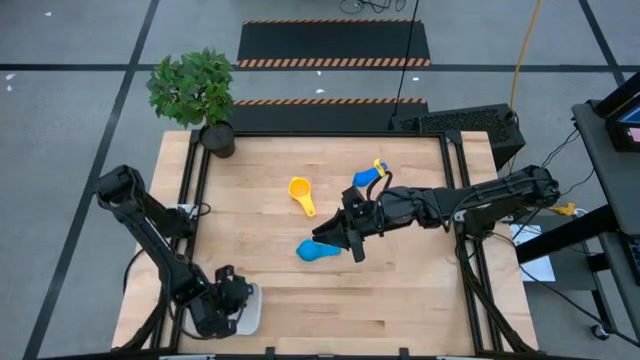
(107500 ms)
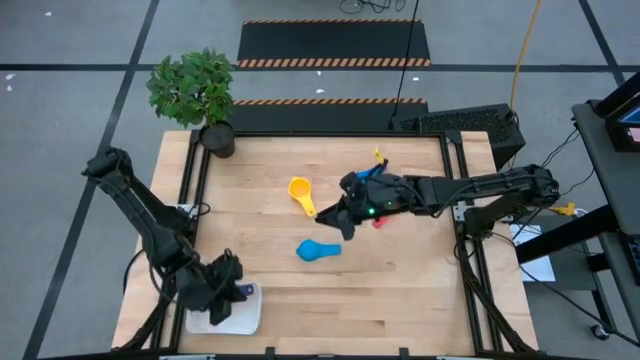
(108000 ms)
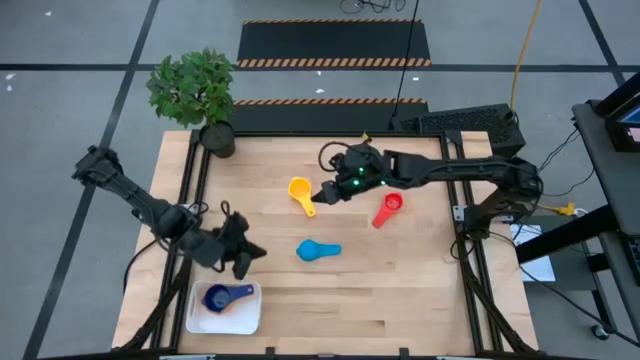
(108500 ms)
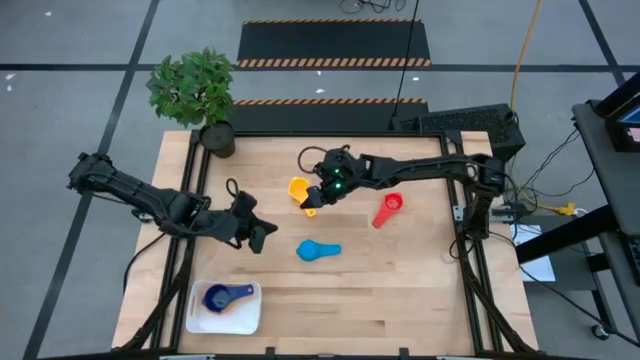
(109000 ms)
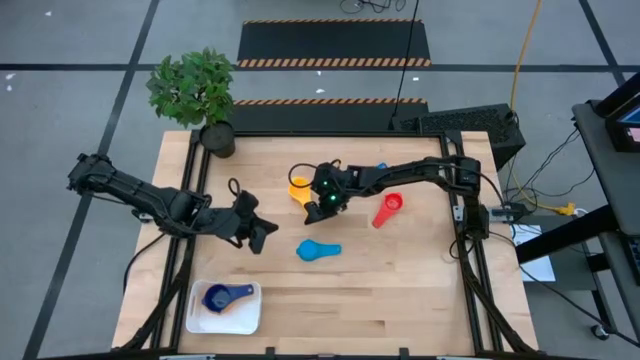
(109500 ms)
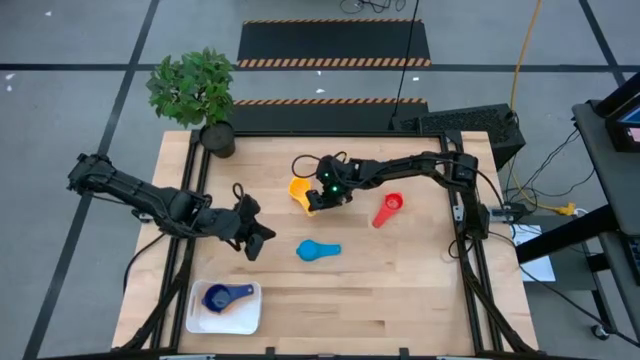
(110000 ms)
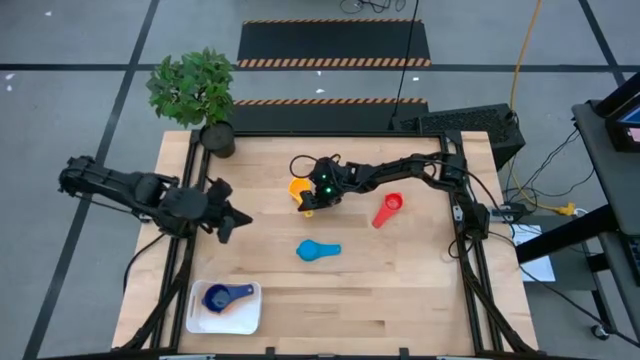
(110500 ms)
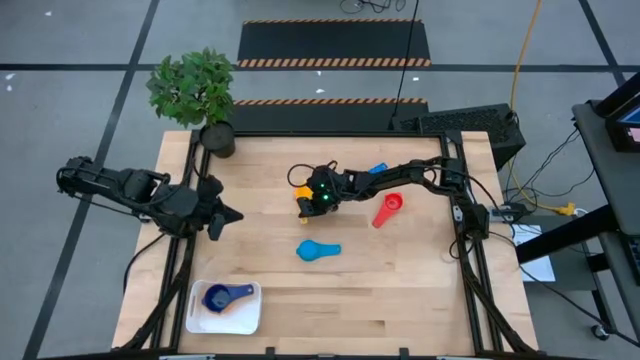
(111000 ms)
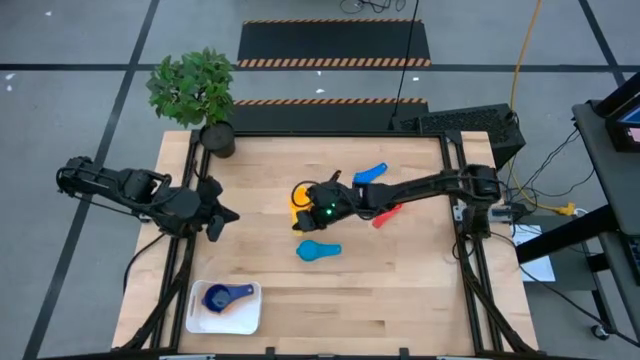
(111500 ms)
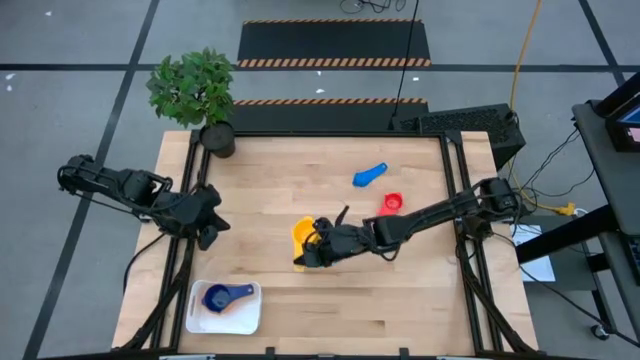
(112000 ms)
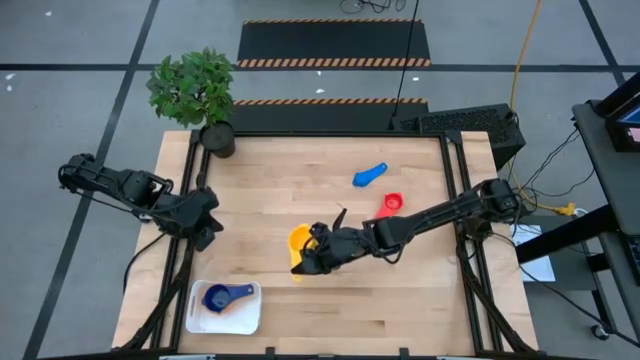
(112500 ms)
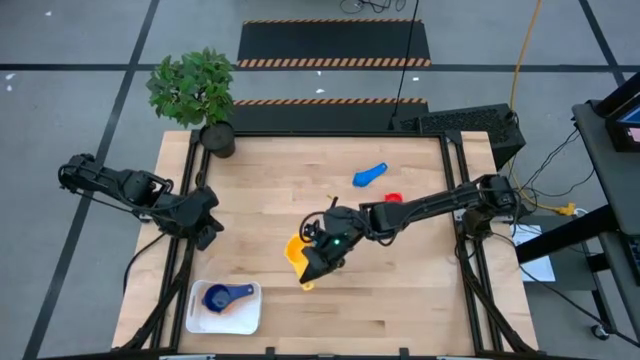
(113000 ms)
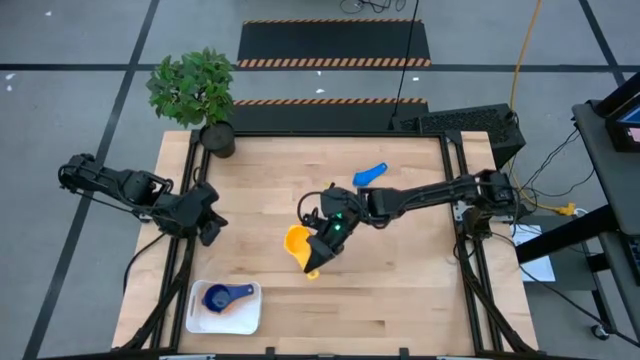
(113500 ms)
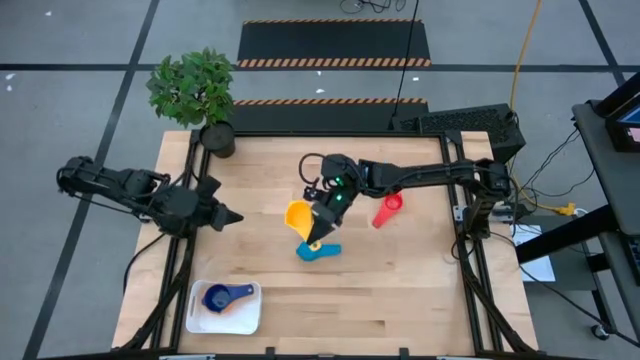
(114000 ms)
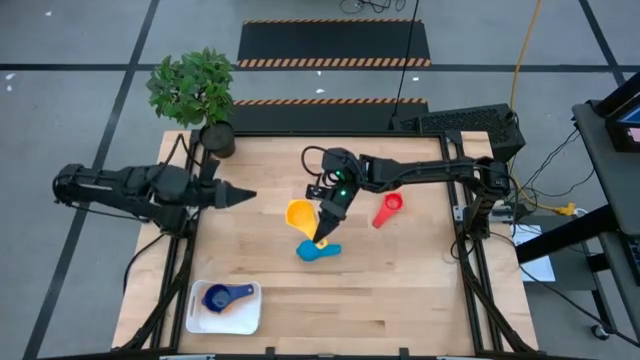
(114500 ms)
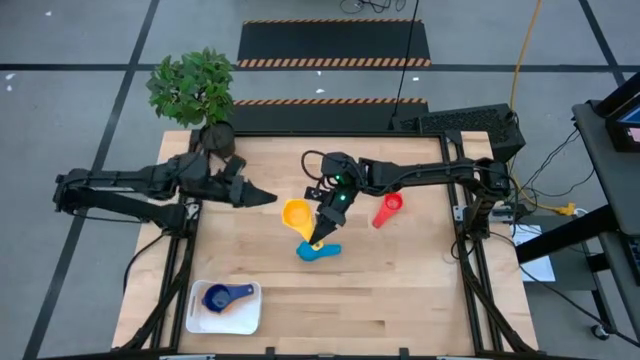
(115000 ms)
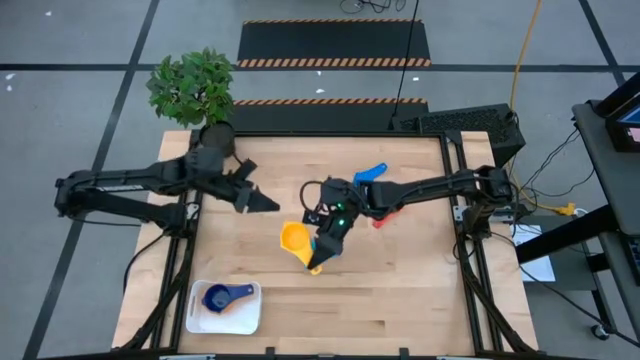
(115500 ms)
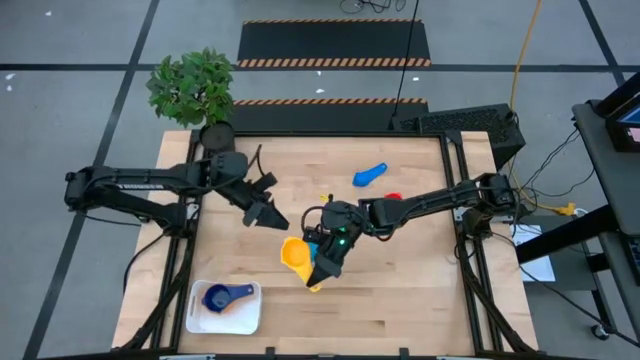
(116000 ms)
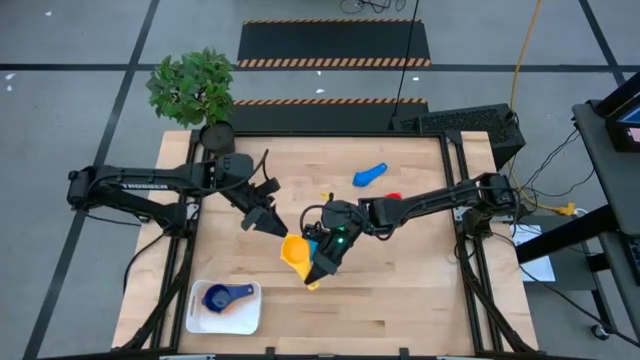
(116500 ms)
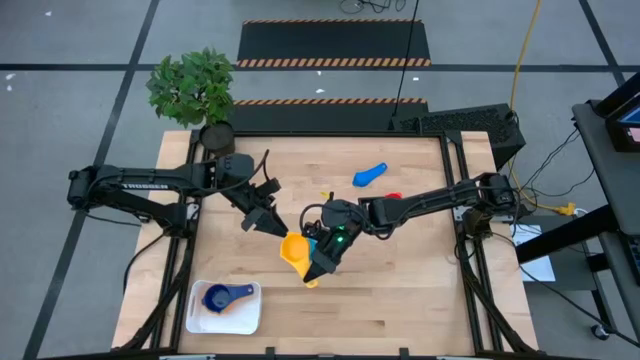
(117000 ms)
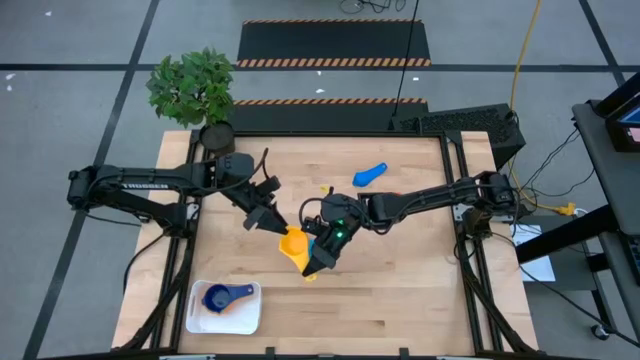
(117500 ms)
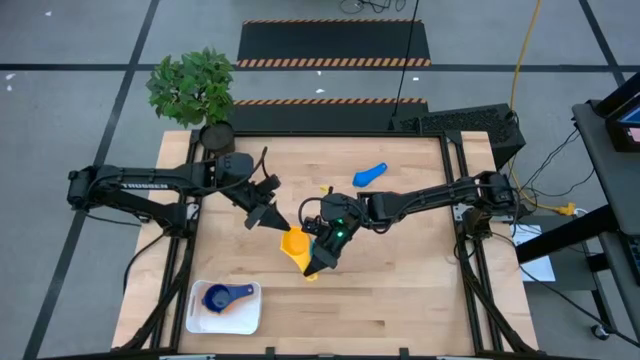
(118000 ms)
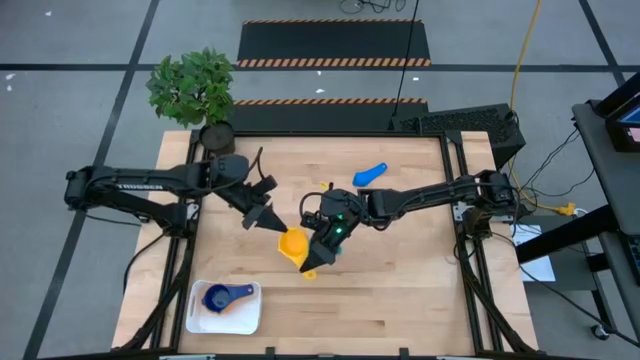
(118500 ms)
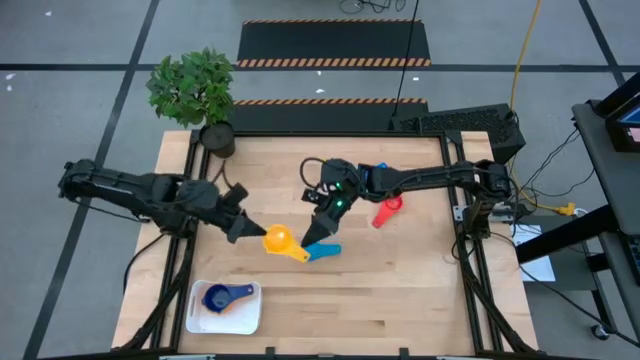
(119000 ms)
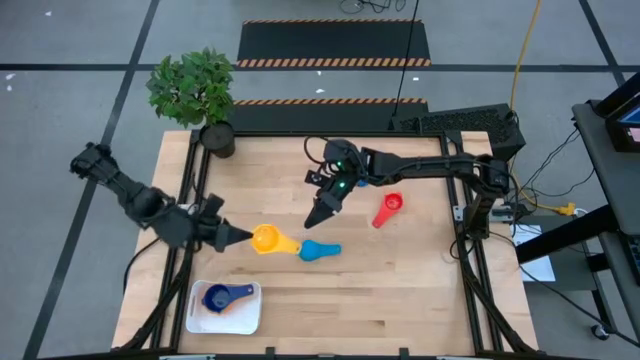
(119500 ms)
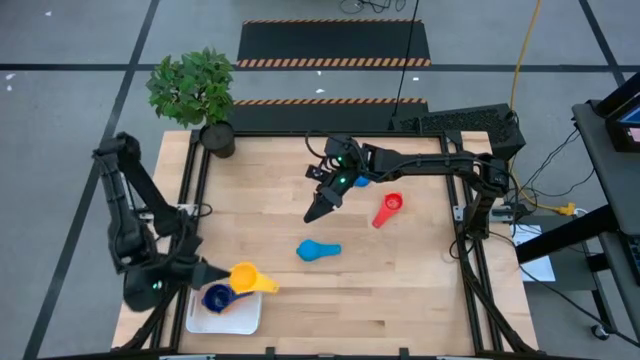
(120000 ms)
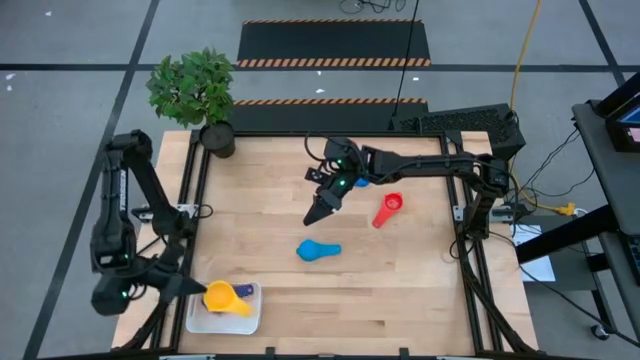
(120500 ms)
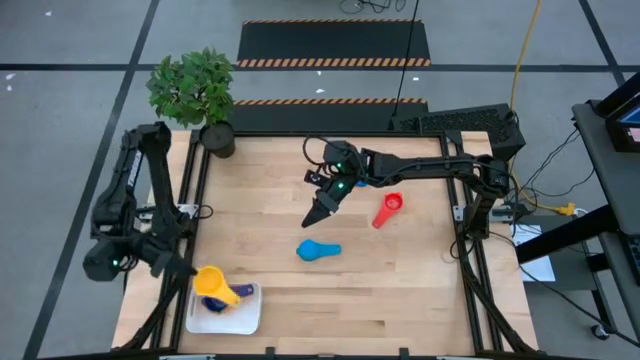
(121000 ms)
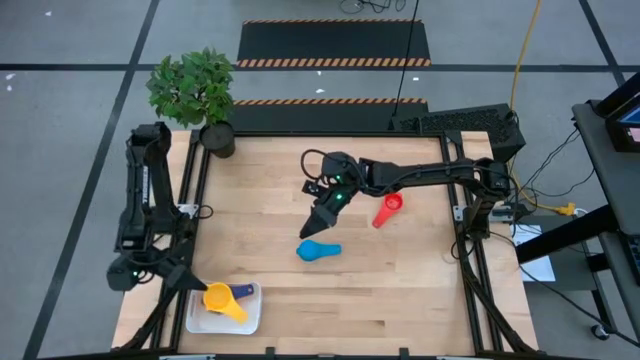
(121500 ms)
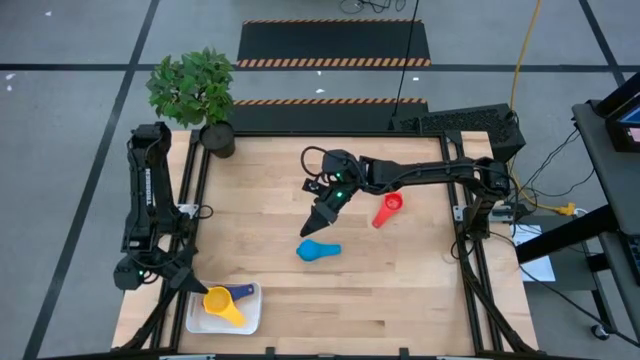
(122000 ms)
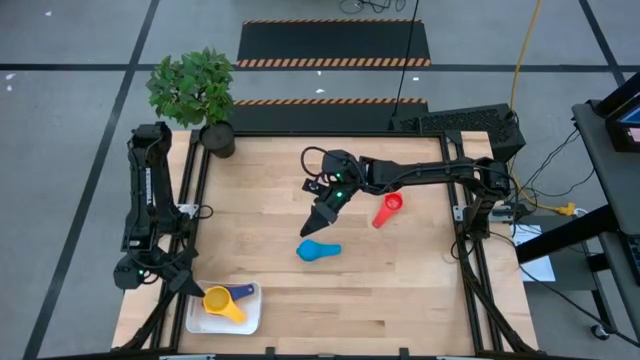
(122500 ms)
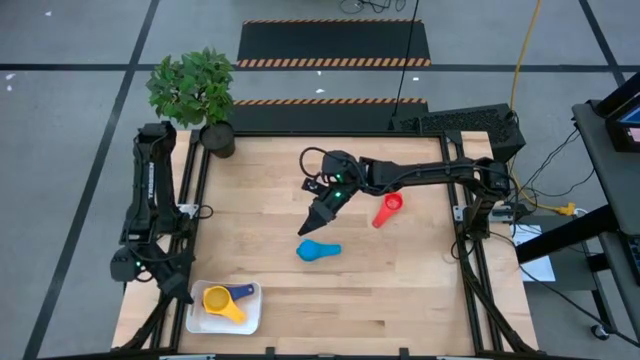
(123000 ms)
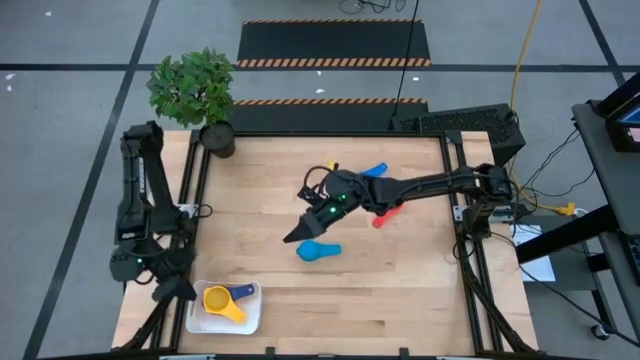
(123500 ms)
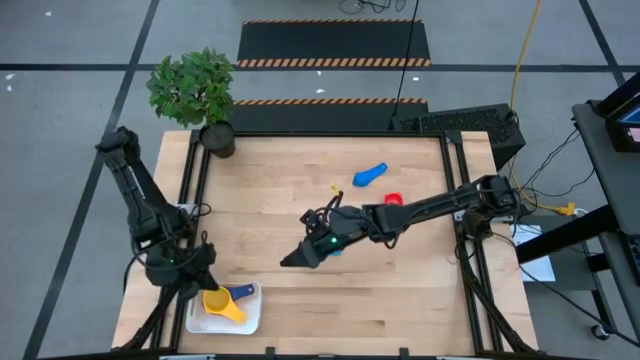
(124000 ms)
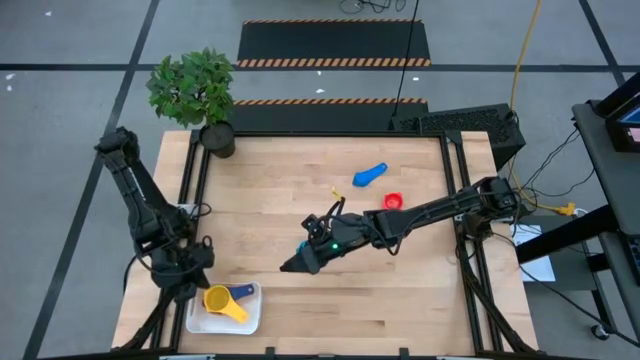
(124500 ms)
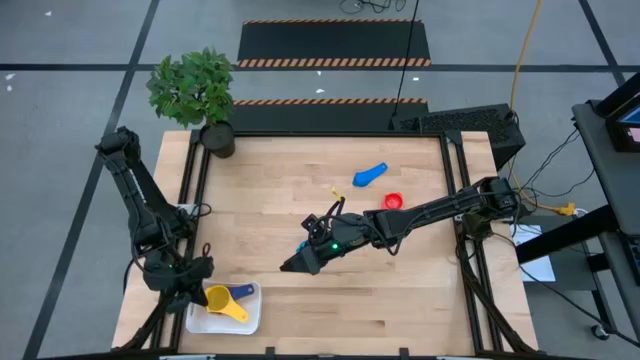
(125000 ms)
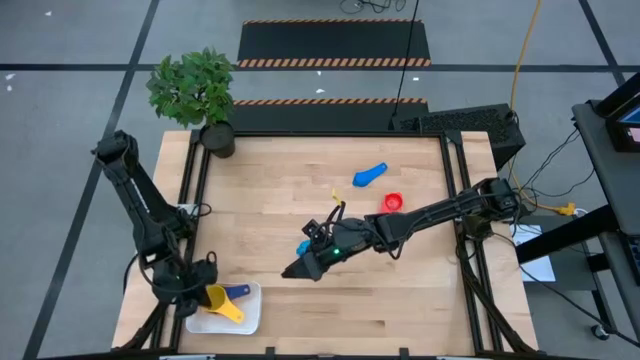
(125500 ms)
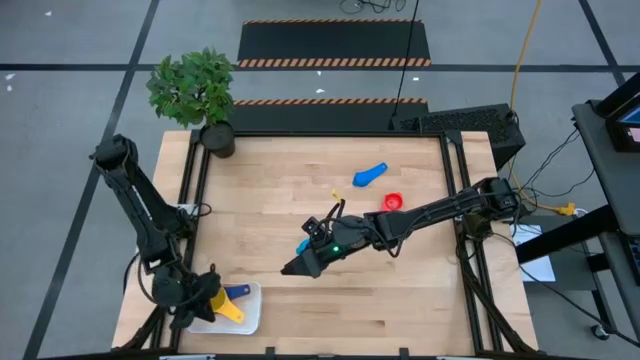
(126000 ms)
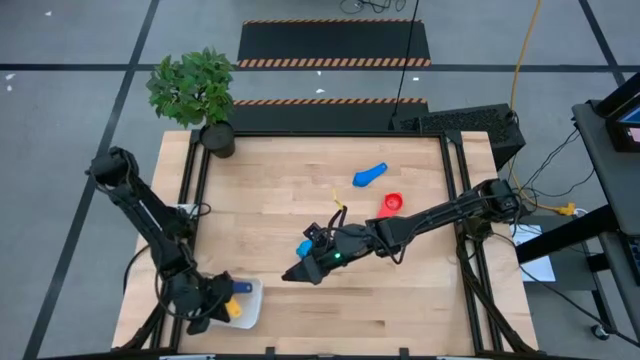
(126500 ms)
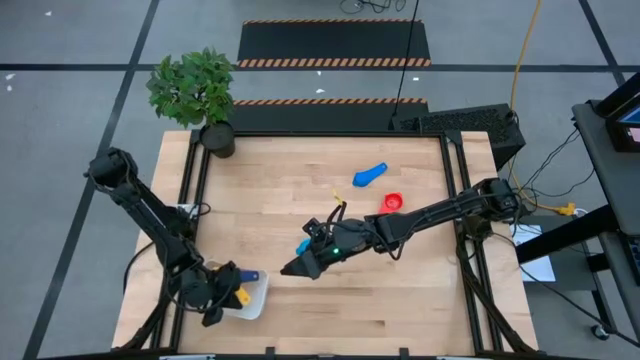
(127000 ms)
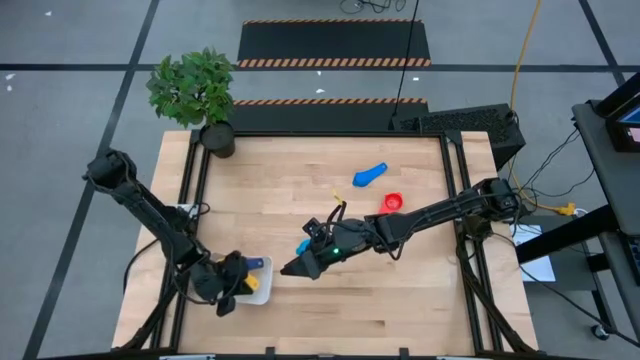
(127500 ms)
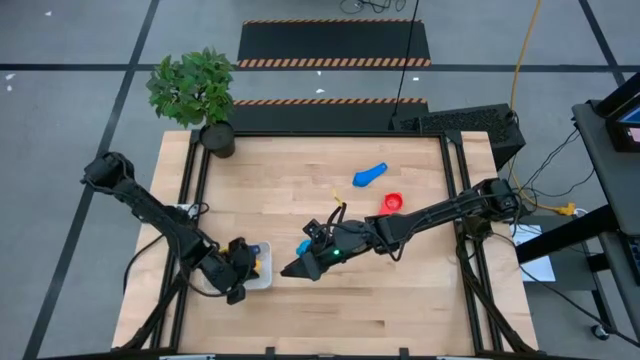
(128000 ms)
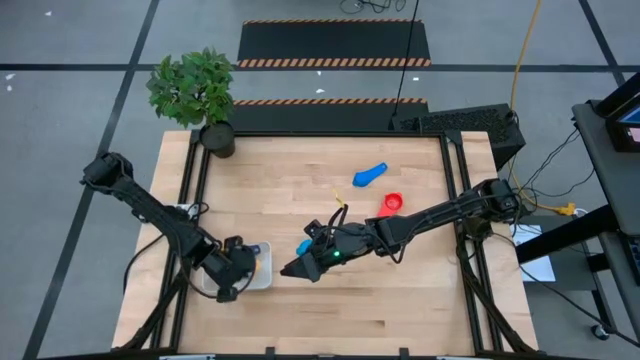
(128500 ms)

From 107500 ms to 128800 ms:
Task: Nest measuring cups in basket
Stack the yellow measuring cup on top of the dark blue measuring cup in the white bin
